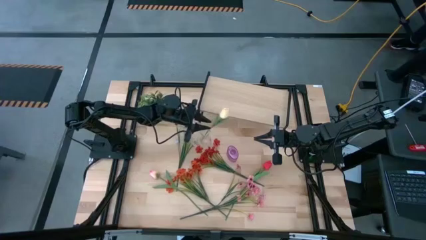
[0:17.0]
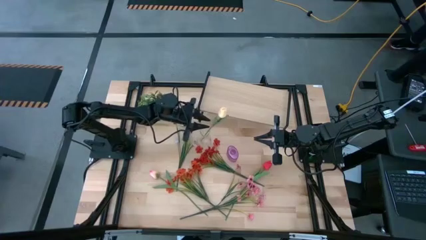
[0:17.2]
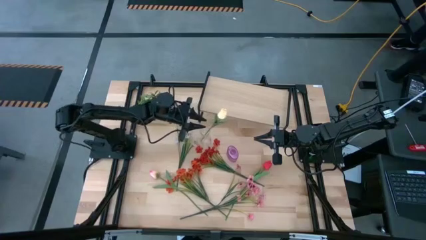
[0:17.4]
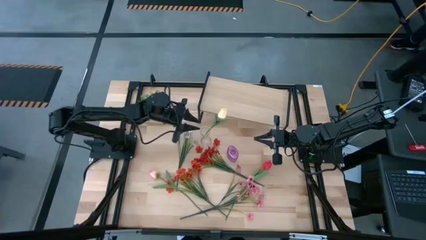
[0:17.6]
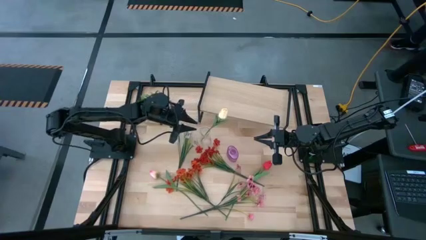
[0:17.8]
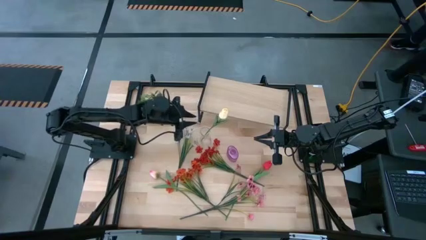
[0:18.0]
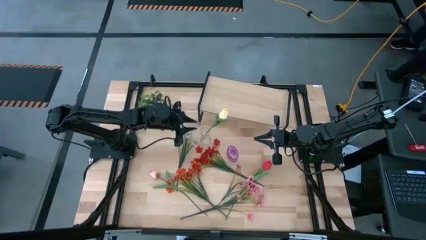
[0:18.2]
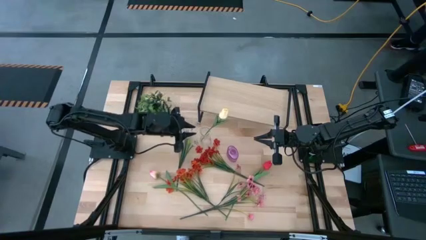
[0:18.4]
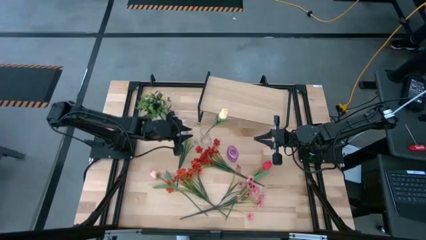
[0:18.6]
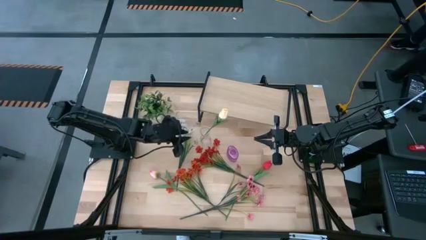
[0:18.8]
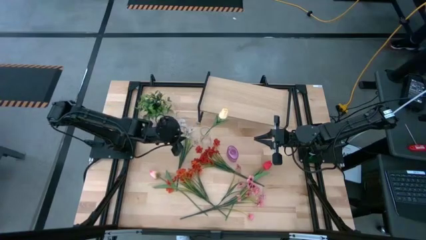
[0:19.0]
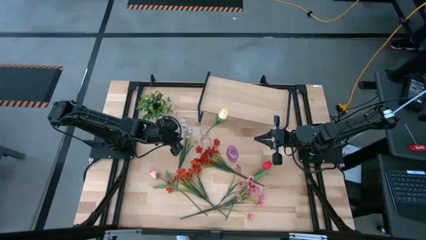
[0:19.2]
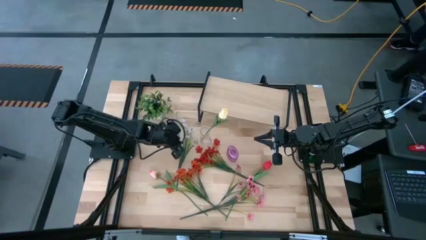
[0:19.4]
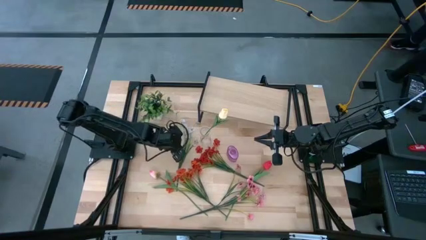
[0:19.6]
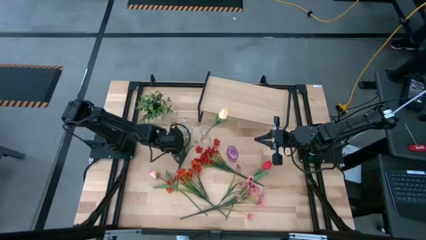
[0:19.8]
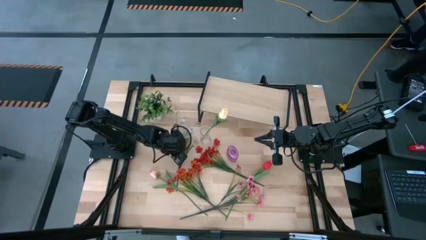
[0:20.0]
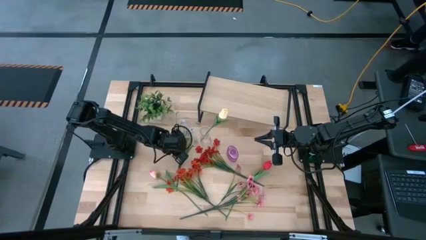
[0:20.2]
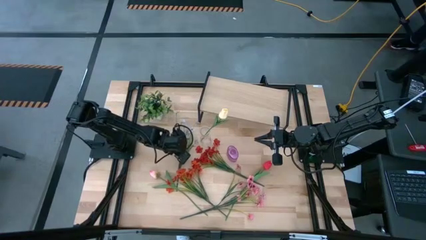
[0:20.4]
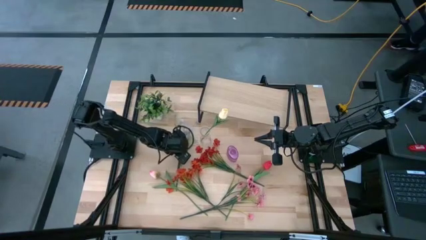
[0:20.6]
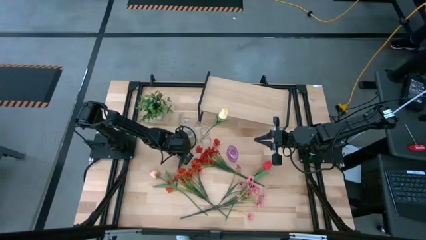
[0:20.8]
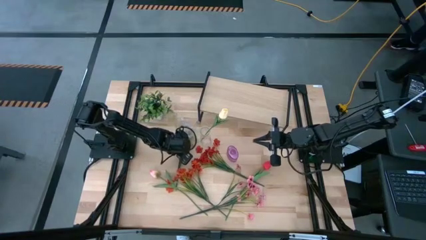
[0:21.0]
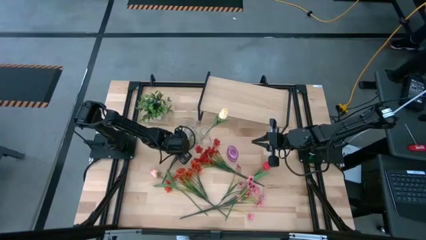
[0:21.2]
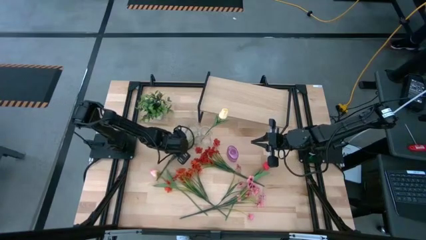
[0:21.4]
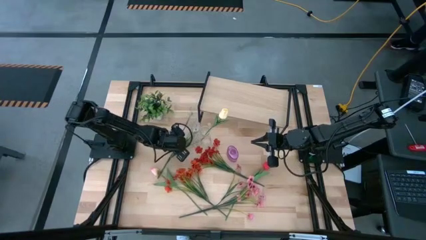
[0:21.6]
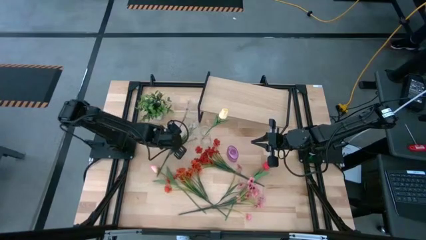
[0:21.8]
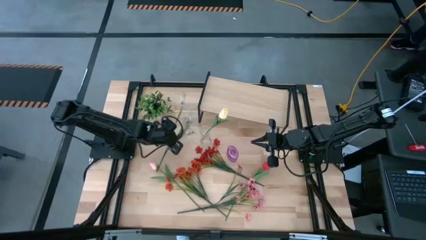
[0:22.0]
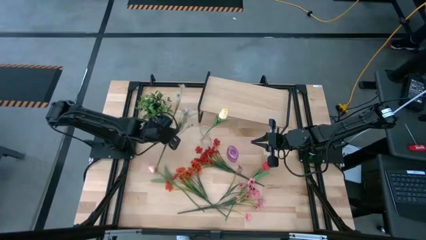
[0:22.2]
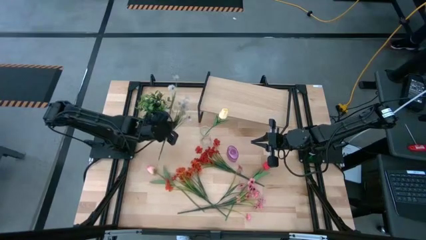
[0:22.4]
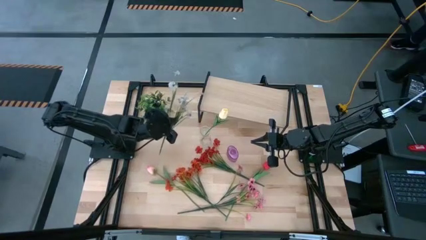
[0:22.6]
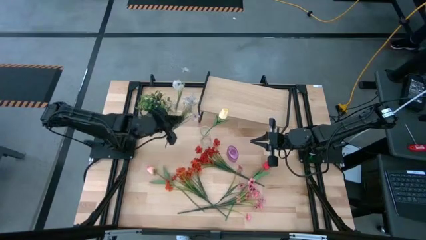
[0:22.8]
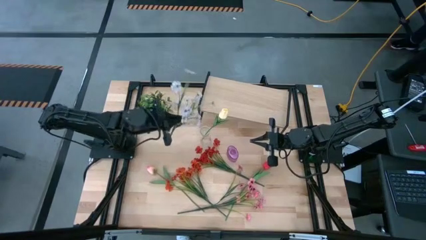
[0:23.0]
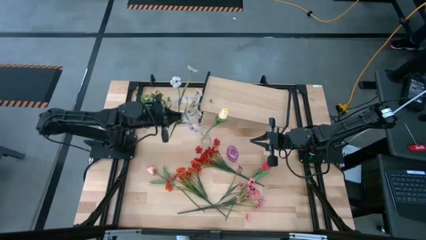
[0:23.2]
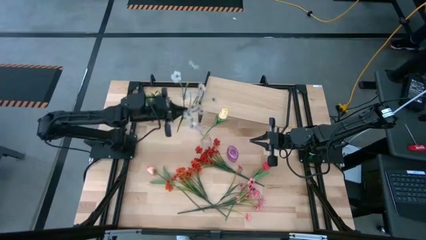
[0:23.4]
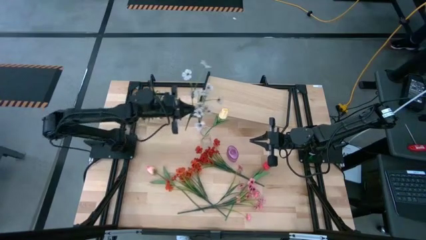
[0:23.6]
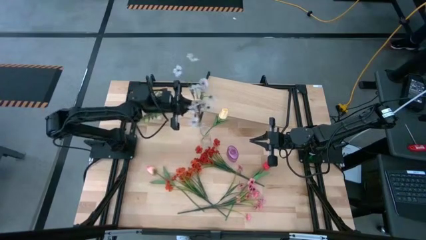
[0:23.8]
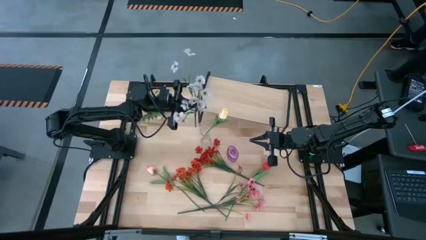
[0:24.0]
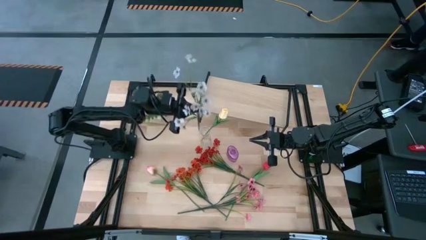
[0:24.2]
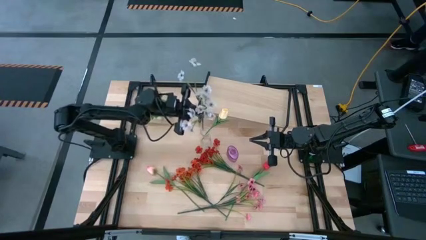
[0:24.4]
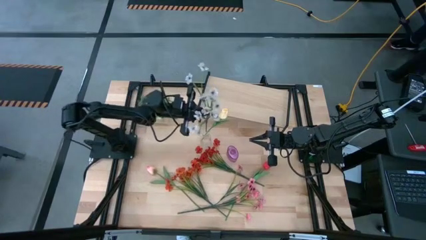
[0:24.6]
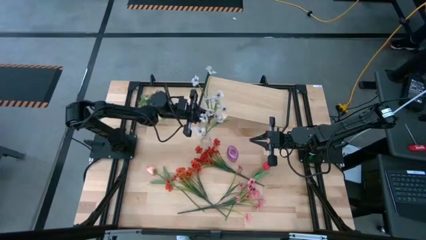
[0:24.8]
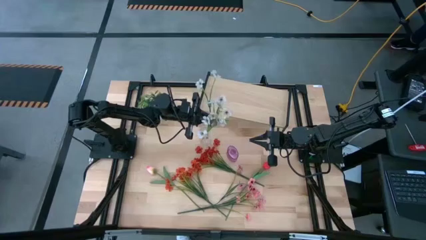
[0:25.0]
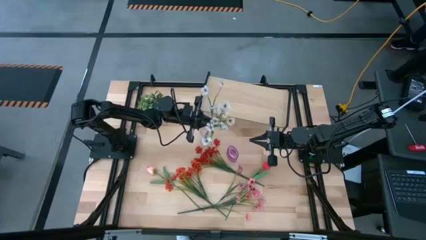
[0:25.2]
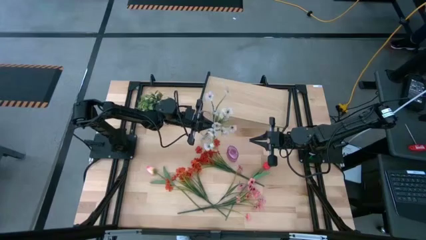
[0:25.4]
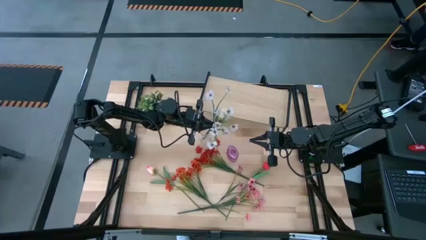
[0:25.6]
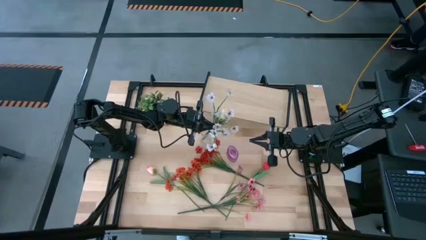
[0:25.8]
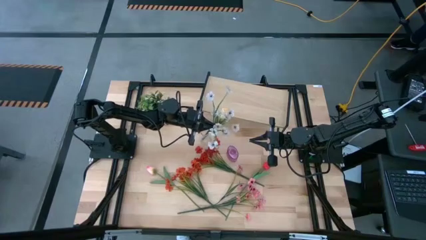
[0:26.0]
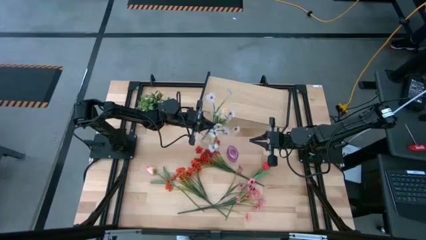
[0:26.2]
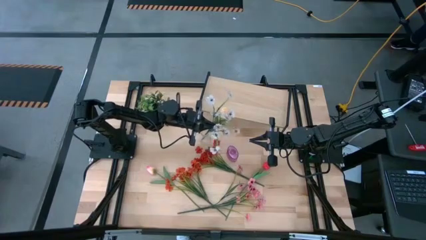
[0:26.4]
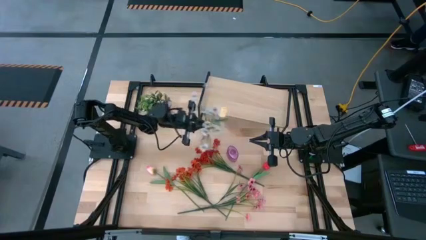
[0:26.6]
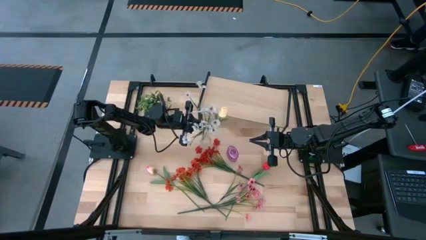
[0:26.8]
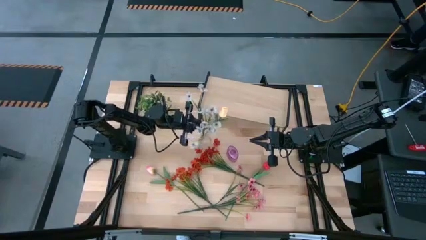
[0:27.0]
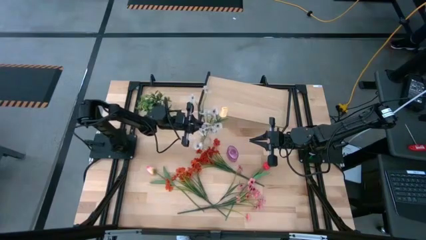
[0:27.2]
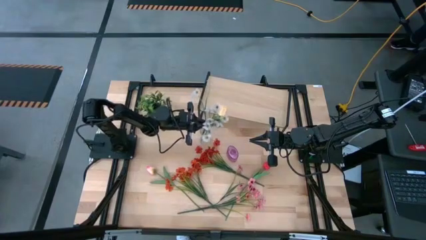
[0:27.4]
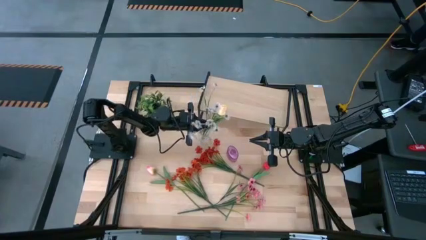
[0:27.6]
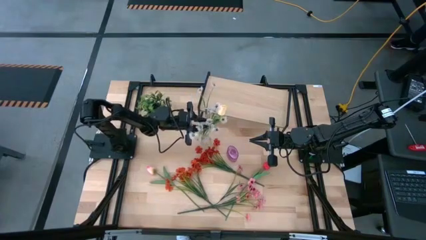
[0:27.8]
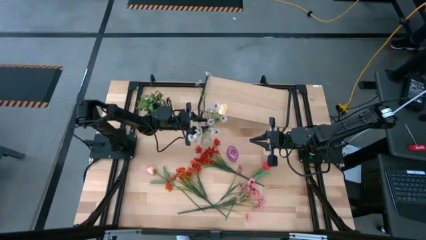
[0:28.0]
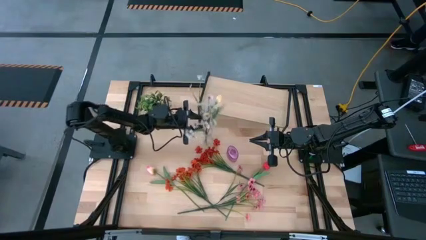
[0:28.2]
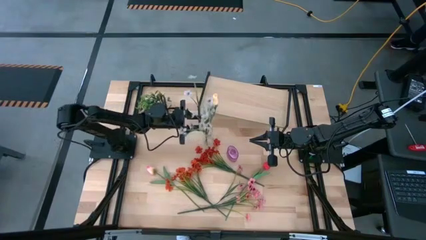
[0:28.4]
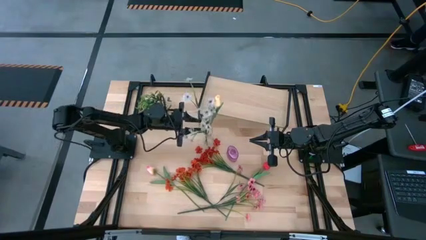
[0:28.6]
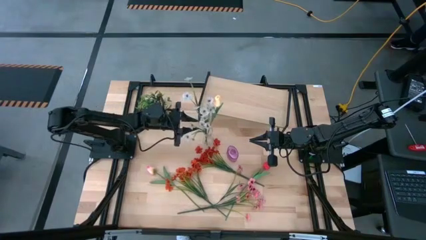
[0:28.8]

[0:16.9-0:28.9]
Task: Pick and place flowers into a vace then onto a shelf
Put the white flowers into the transparent vase
